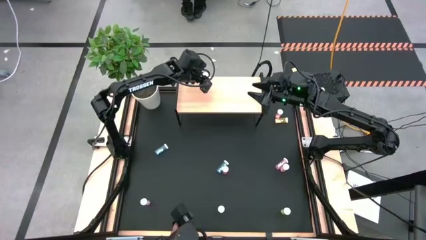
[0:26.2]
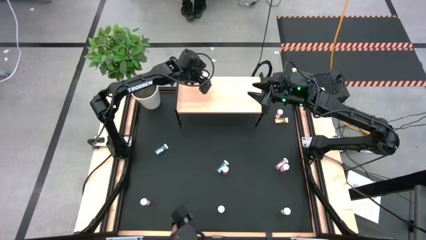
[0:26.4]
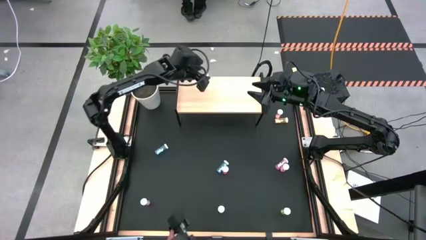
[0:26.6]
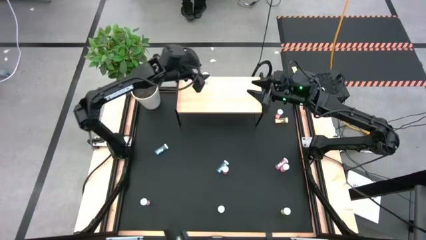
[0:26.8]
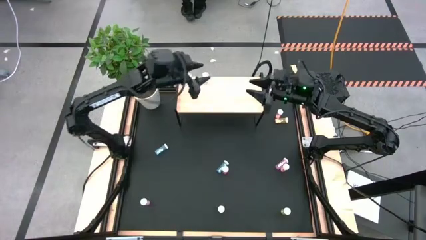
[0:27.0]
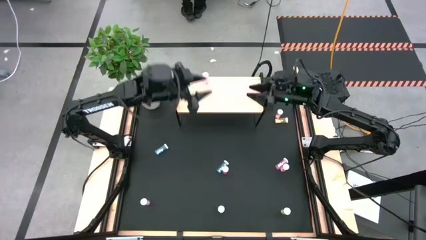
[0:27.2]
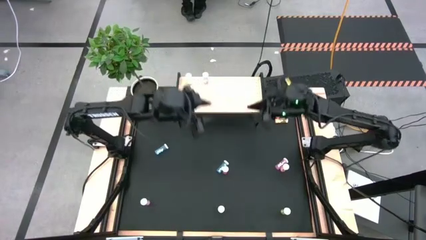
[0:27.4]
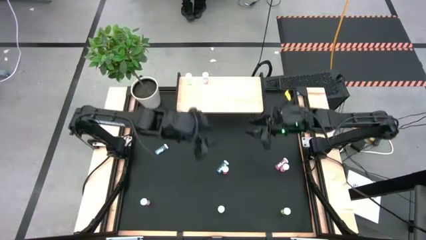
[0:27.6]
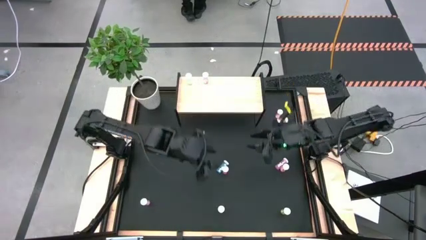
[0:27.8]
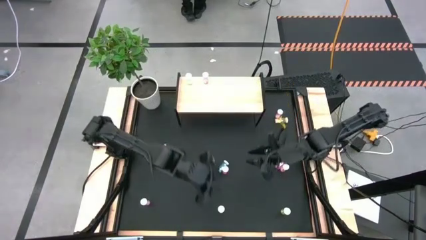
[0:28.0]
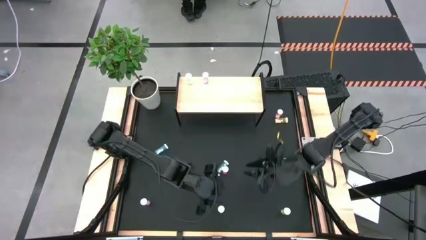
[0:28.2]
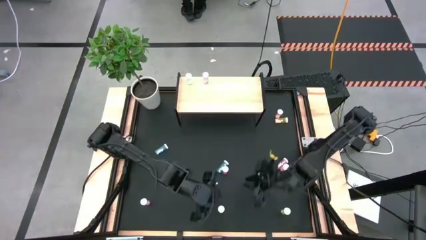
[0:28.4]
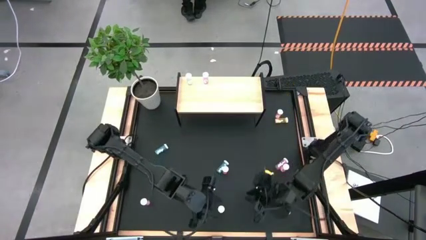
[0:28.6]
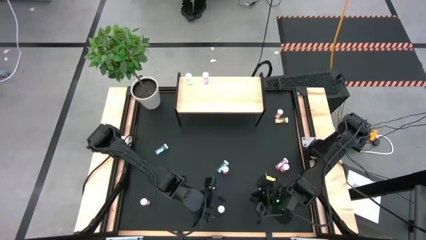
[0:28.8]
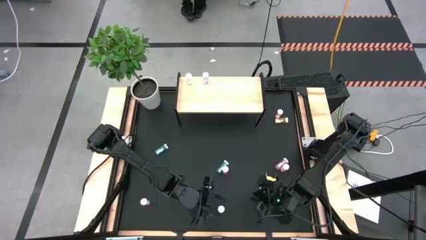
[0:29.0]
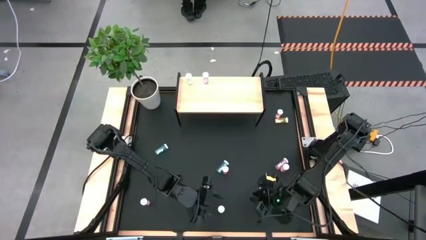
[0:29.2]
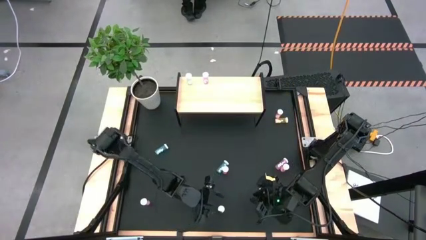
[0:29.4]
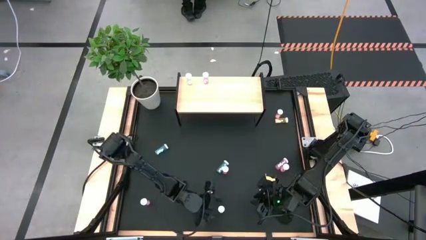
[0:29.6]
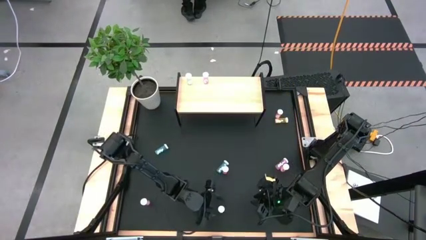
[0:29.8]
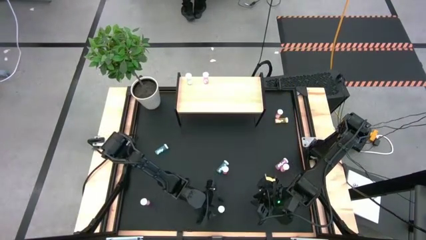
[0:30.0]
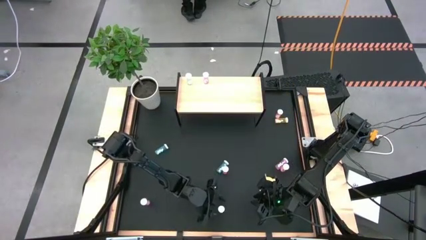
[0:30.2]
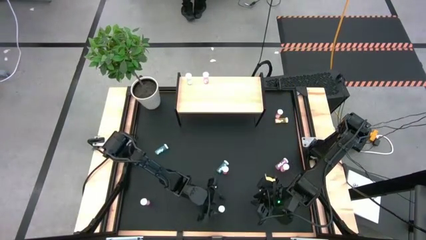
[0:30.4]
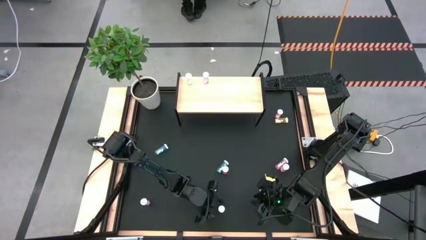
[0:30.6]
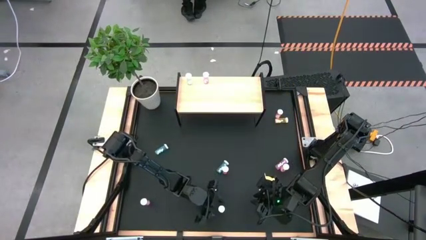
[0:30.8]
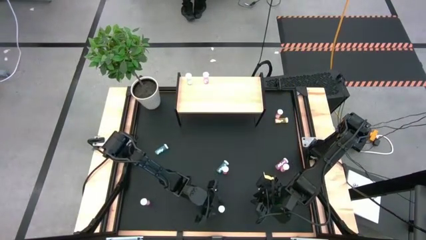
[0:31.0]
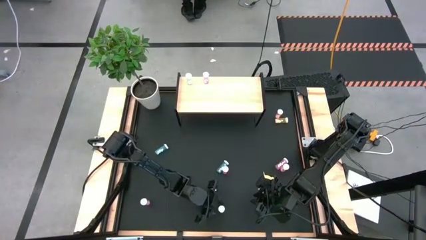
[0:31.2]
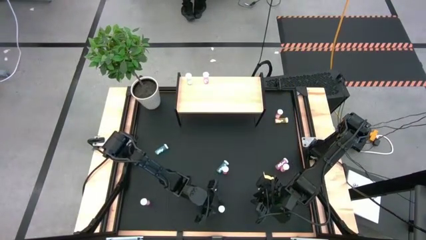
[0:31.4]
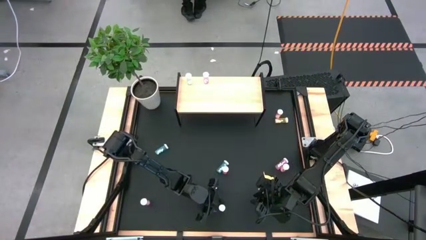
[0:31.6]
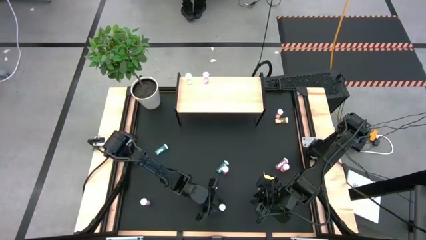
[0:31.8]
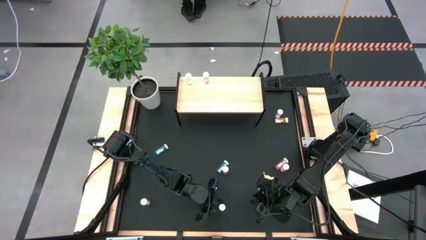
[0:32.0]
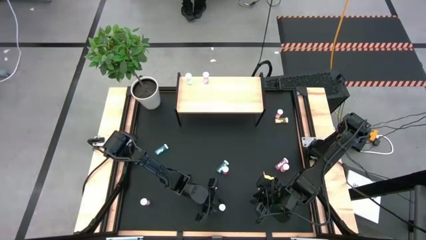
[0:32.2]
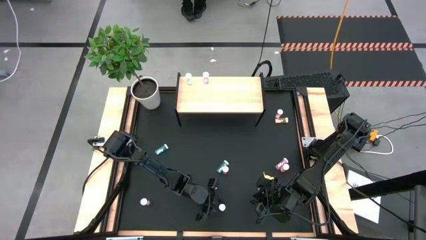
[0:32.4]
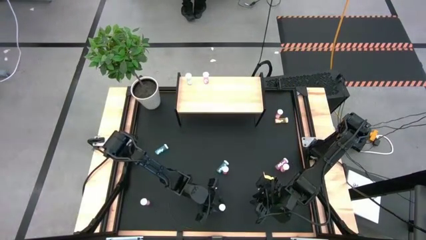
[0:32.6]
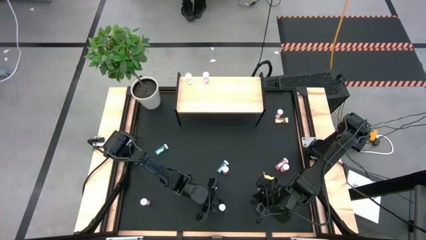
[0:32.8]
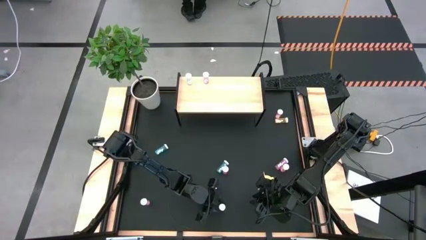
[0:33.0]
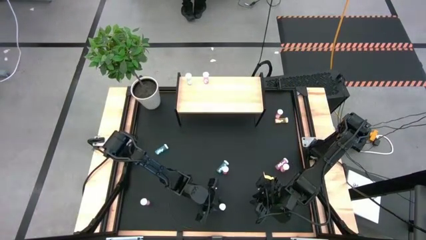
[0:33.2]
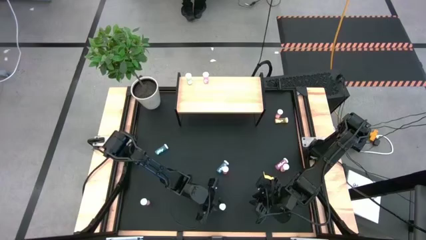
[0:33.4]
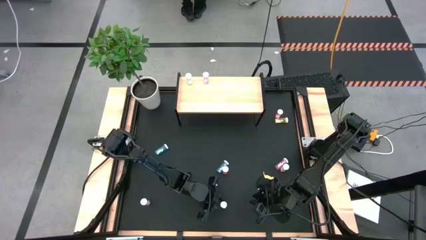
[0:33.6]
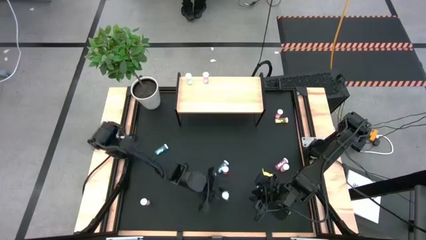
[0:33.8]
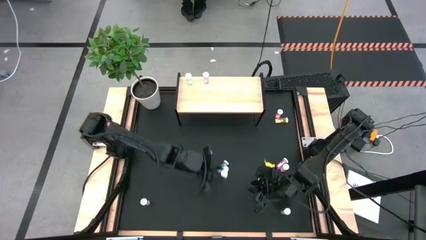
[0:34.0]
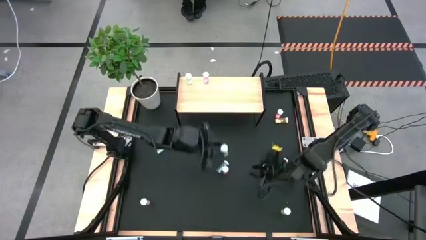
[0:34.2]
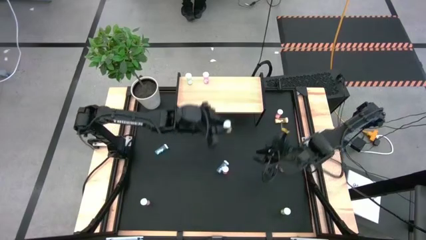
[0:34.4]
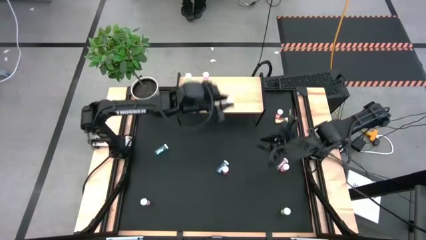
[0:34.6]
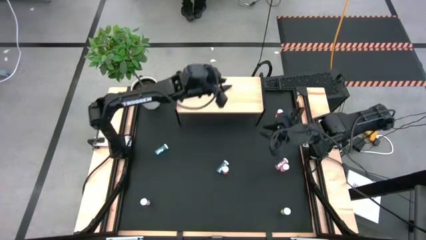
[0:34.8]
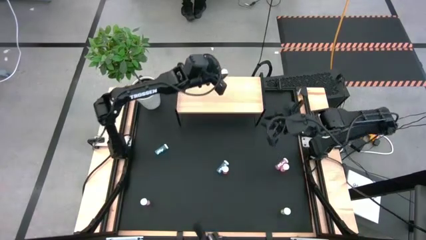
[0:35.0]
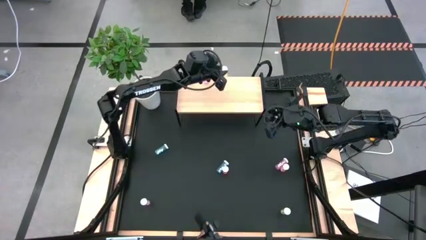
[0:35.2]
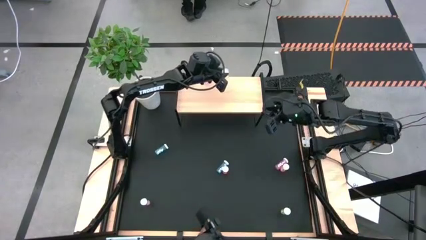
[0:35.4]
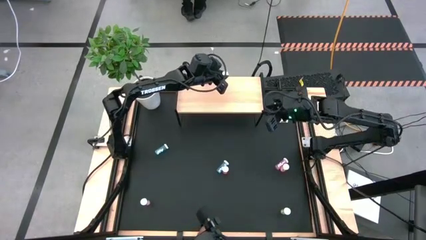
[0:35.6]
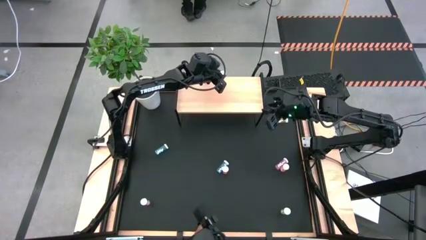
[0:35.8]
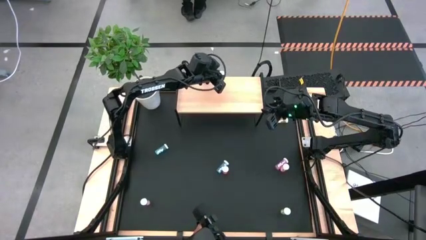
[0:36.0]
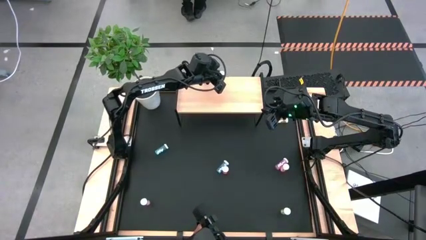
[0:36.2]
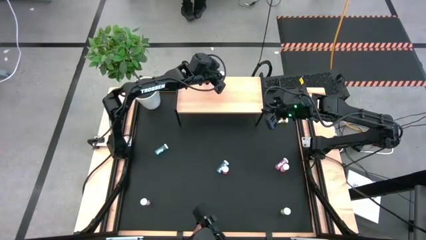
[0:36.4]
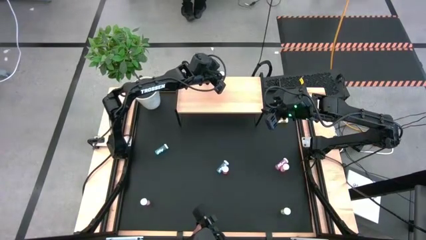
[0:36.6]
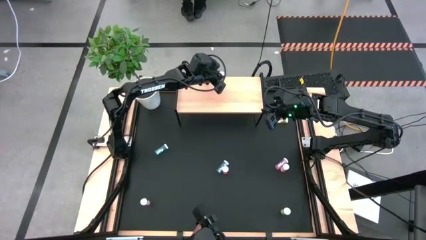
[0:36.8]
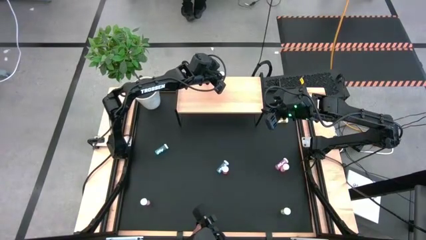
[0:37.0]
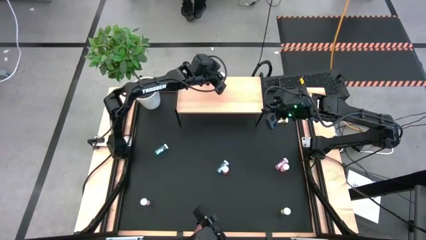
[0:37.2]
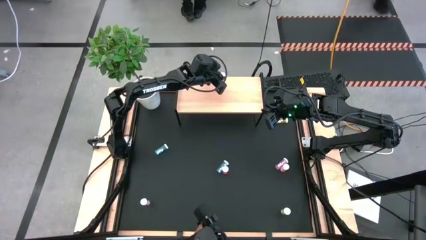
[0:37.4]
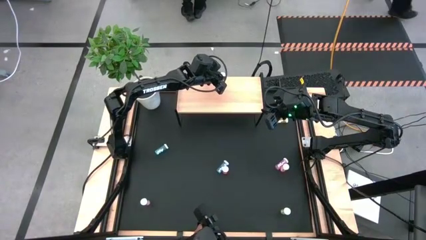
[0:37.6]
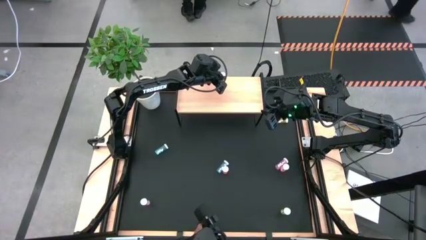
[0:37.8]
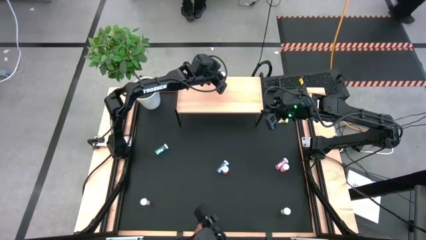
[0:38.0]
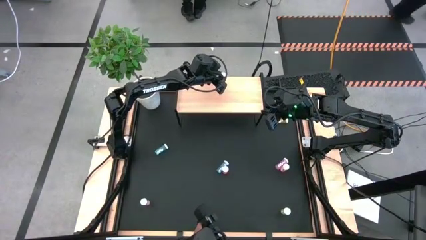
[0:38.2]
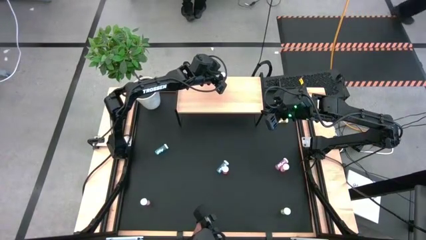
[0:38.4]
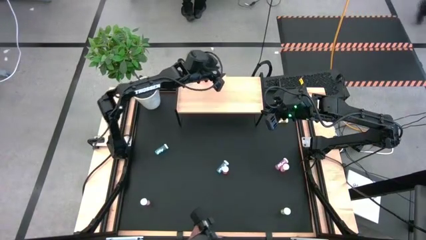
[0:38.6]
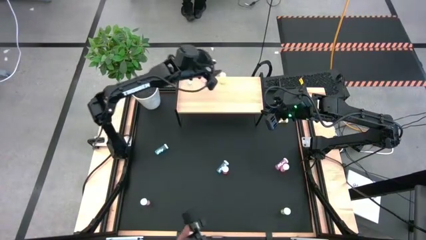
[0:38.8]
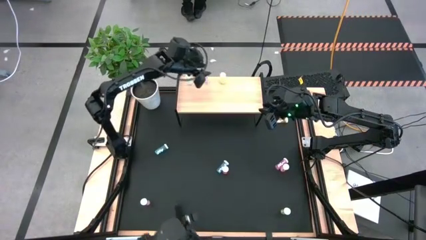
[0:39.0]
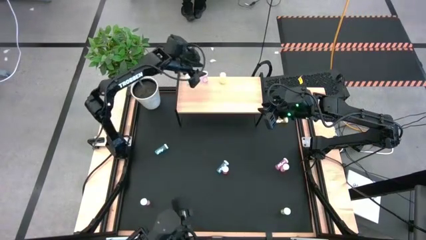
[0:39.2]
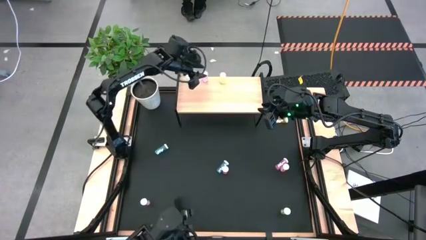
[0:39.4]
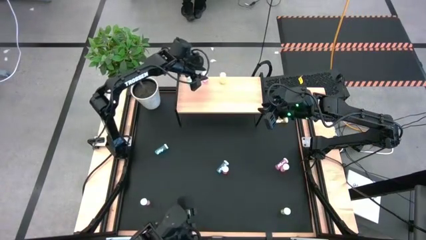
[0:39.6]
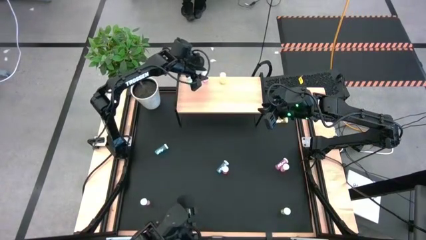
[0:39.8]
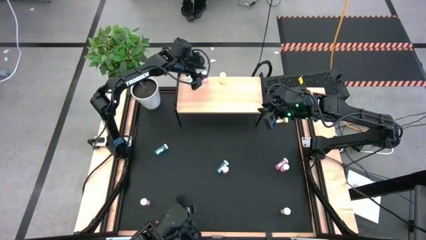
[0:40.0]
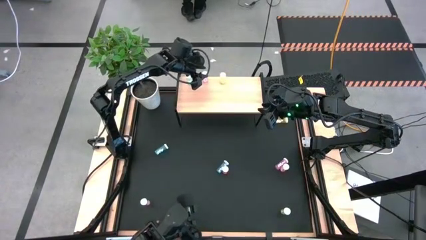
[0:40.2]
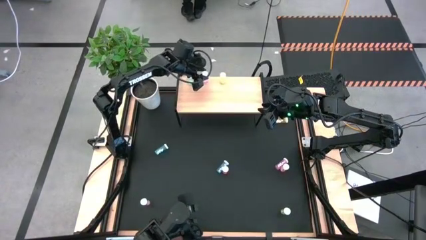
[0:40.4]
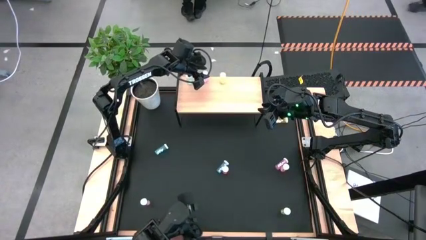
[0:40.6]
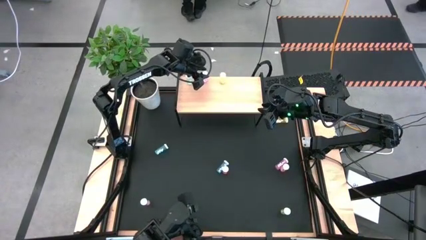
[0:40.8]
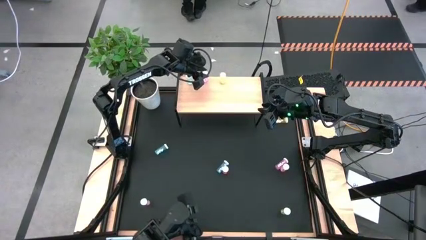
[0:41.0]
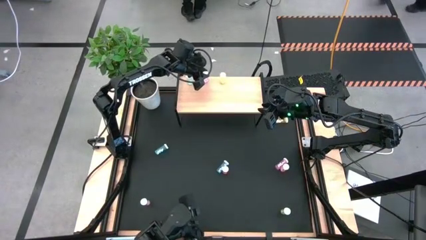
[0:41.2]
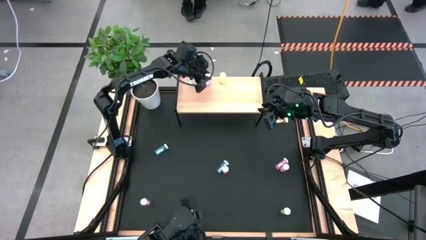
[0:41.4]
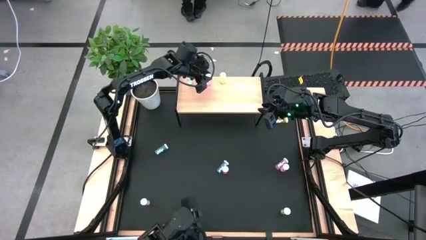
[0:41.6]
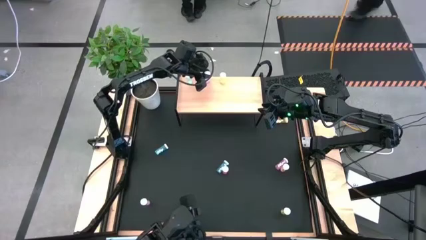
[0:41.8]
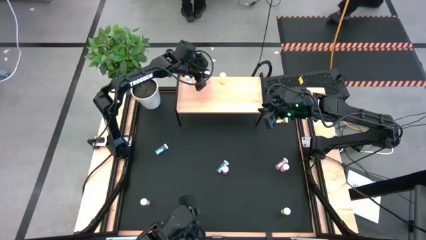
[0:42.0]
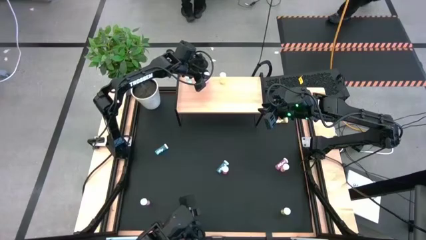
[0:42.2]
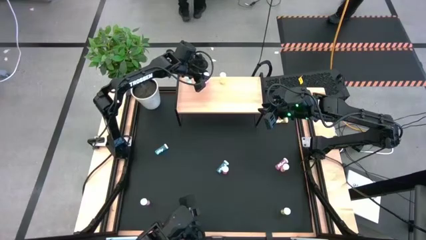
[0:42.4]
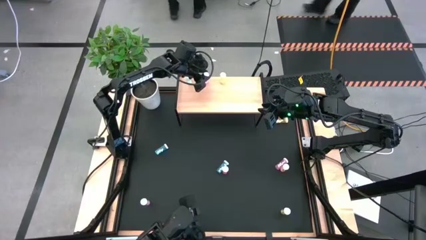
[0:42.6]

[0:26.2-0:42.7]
Task: Pick and place medicine bottles onto shelf by color
Put the bottom left yellow pill bottle on the shelf
